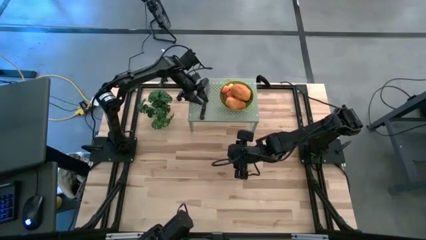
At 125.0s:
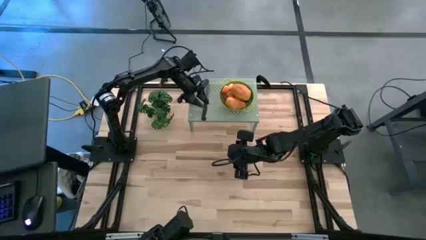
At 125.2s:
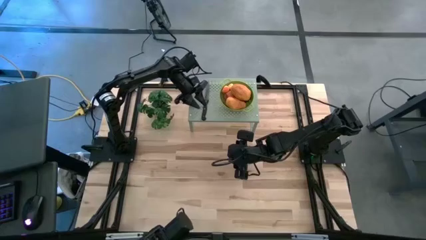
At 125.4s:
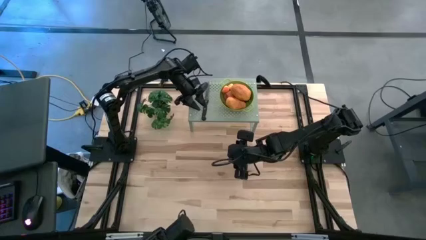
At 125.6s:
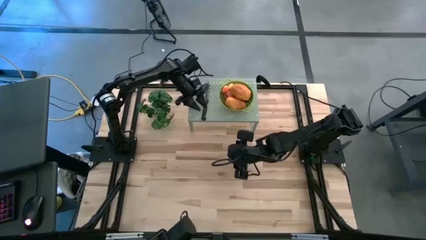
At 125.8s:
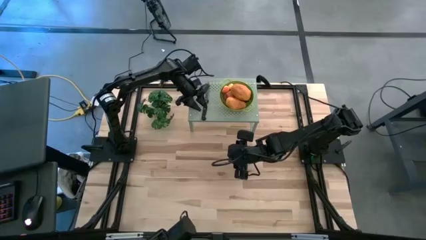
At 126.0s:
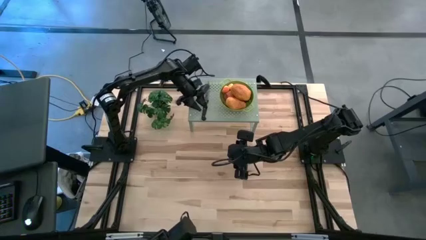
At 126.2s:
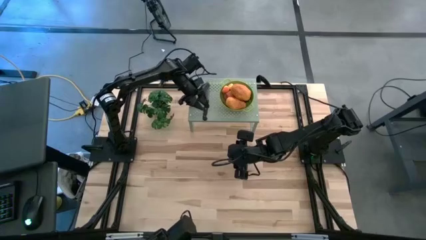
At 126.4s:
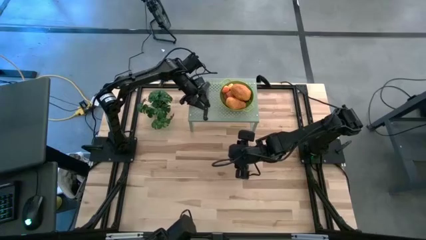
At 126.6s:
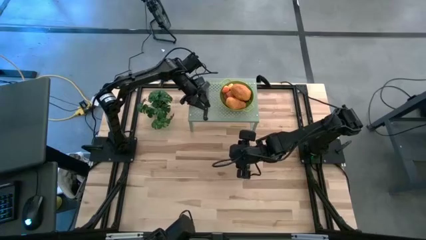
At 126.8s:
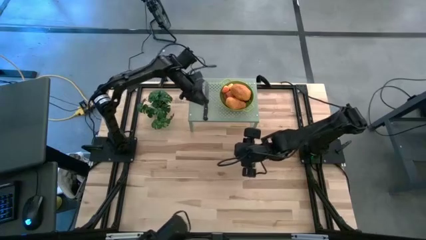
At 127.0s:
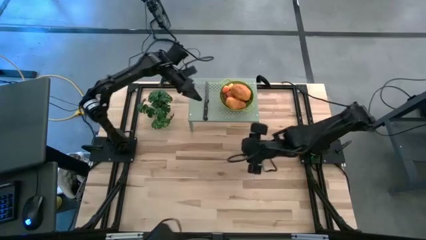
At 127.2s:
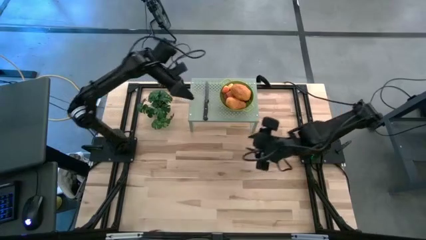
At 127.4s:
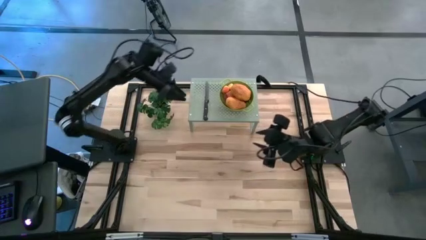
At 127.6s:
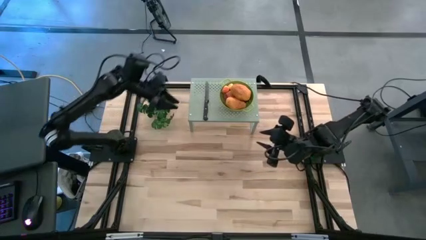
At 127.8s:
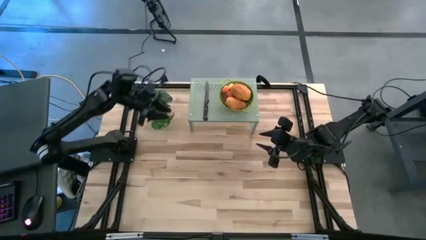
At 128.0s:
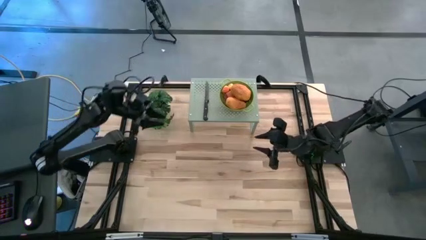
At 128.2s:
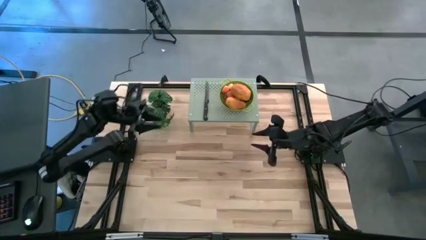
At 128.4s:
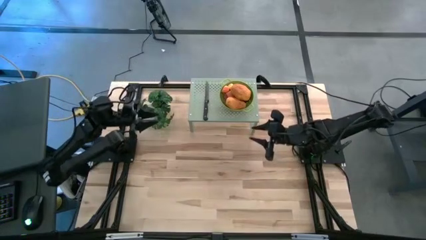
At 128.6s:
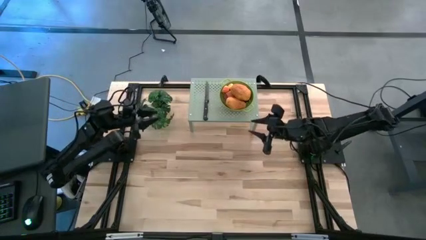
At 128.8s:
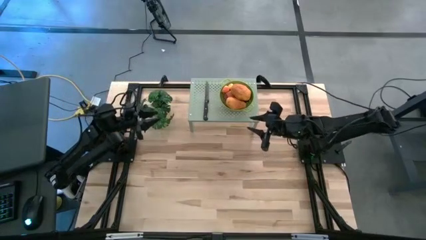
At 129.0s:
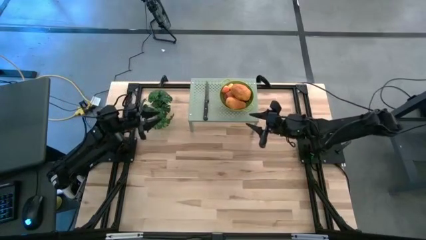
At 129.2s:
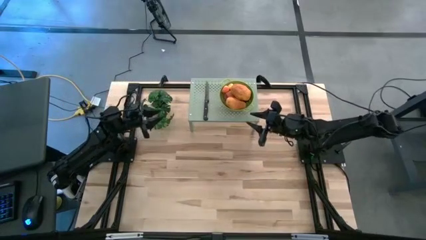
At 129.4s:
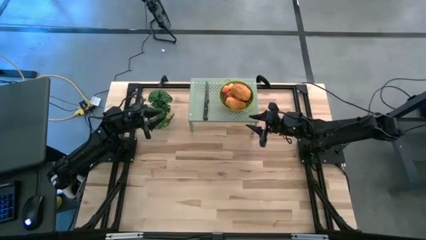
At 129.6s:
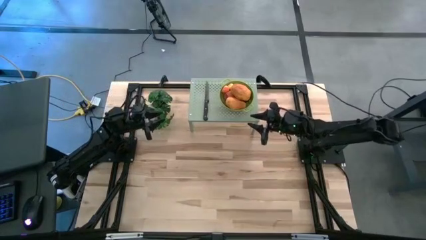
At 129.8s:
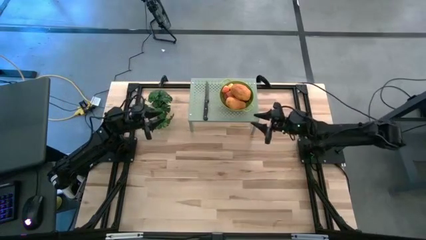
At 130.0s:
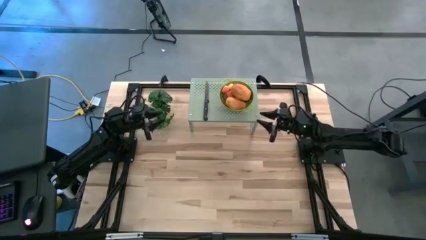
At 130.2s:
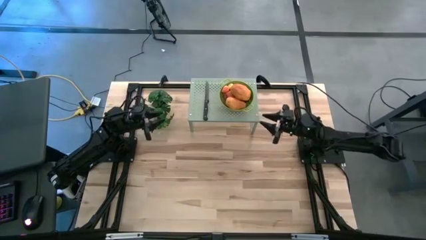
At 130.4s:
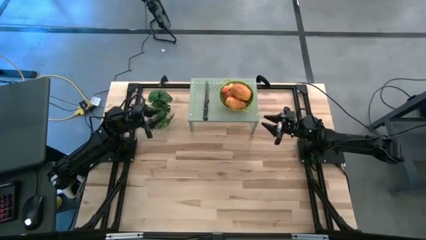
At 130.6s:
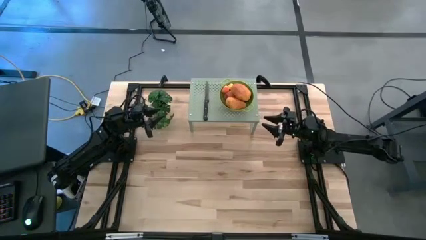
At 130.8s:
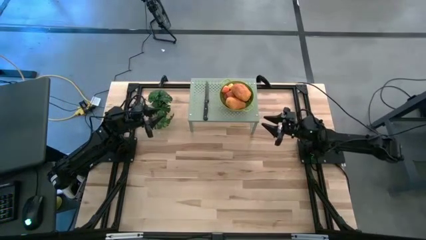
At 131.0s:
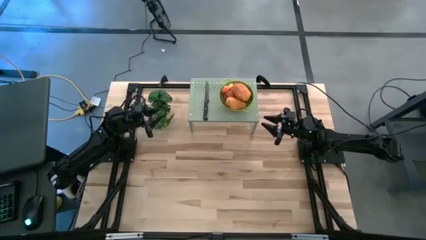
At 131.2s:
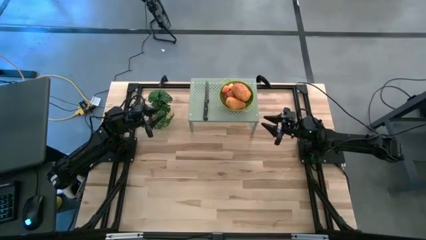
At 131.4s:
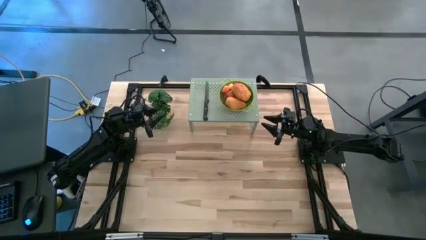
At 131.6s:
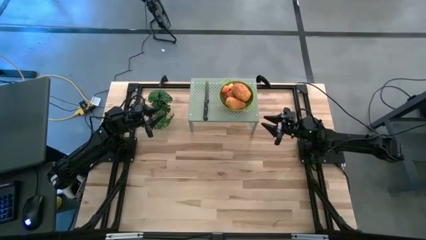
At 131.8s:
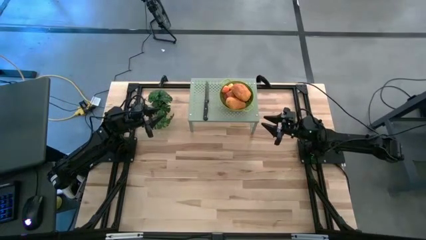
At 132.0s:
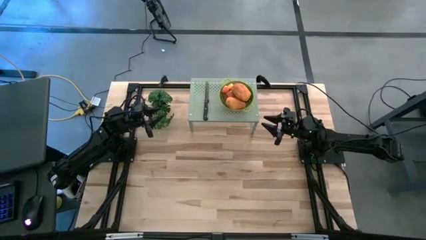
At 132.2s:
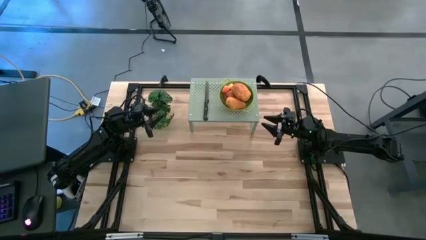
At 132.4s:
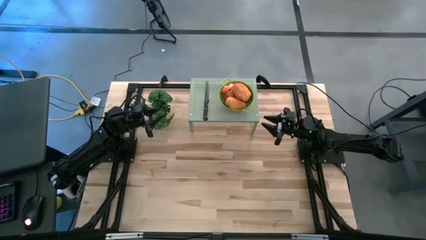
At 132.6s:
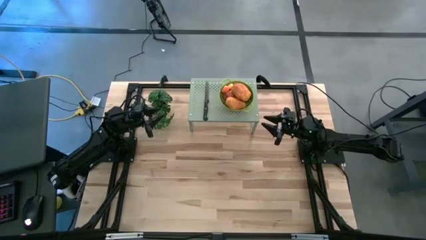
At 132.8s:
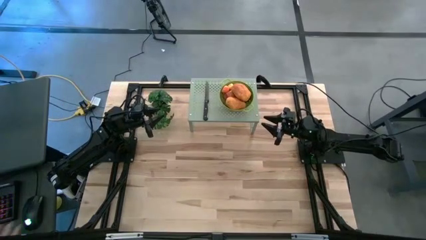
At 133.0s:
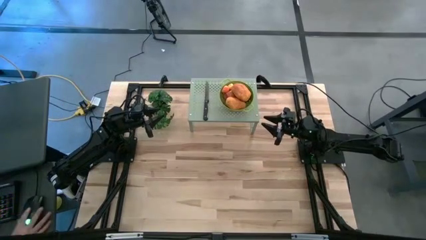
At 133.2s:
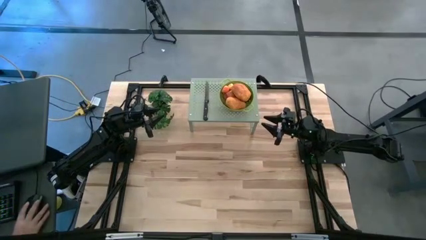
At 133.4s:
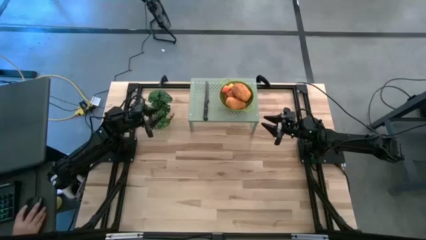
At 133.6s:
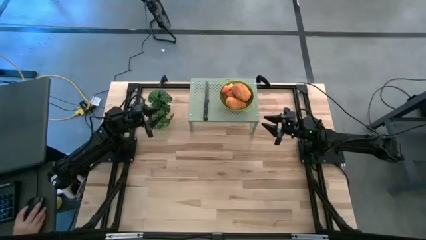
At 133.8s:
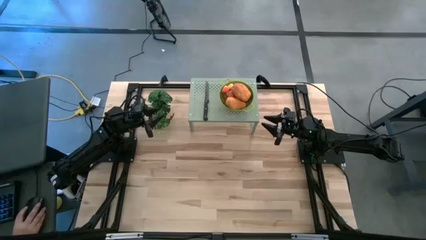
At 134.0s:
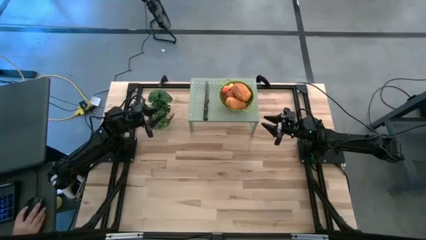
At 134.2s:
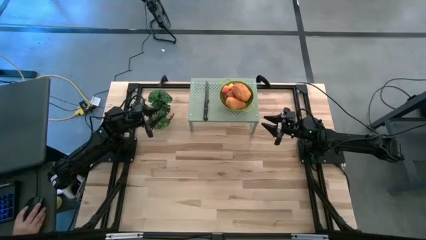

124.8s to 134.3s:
Task: Pick & Place Fruit
Return to Home Position
